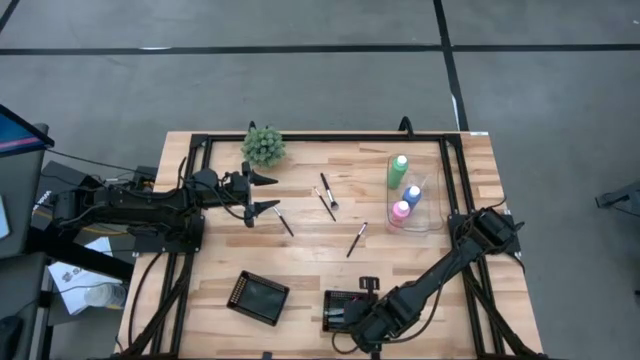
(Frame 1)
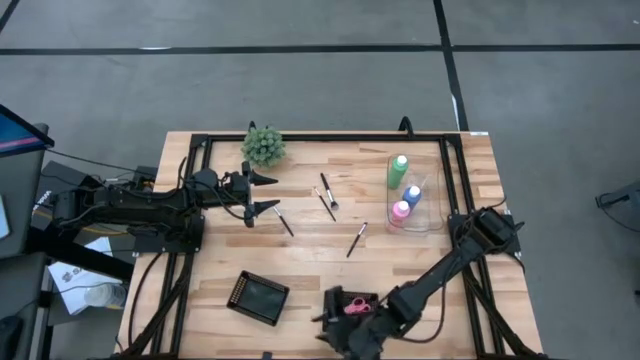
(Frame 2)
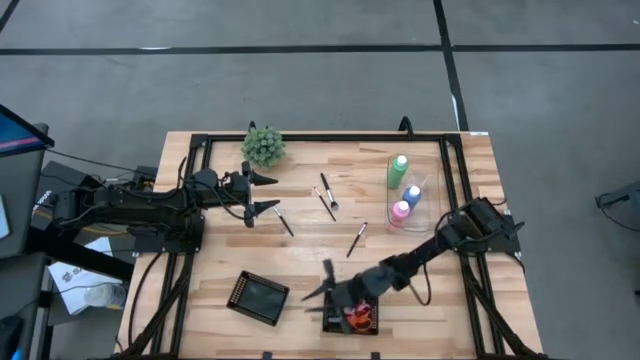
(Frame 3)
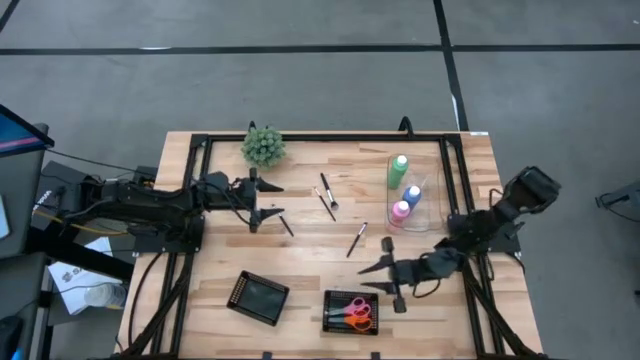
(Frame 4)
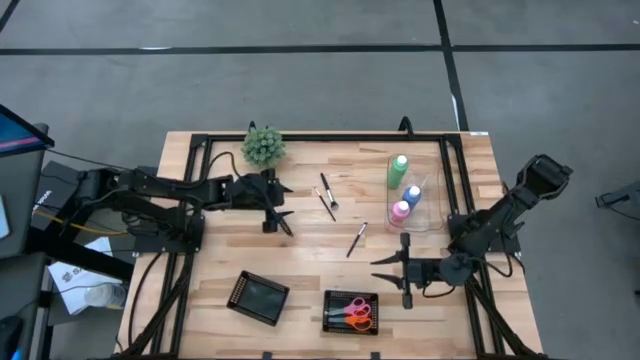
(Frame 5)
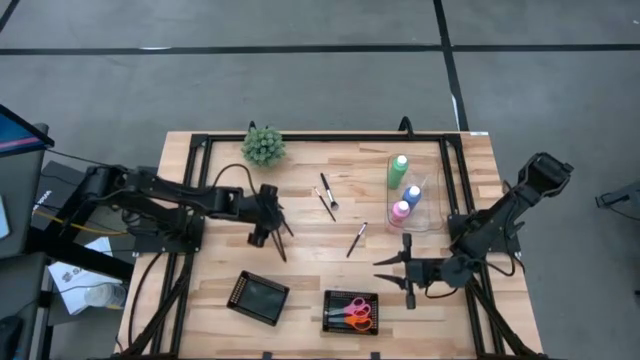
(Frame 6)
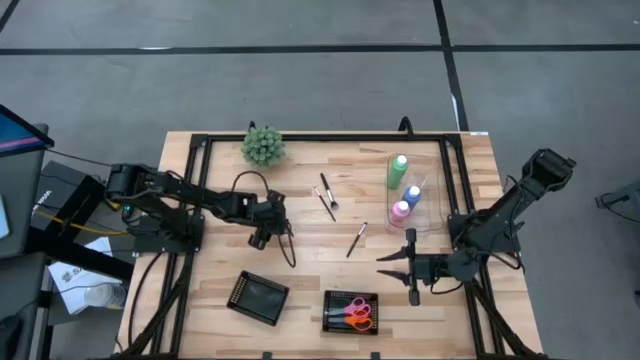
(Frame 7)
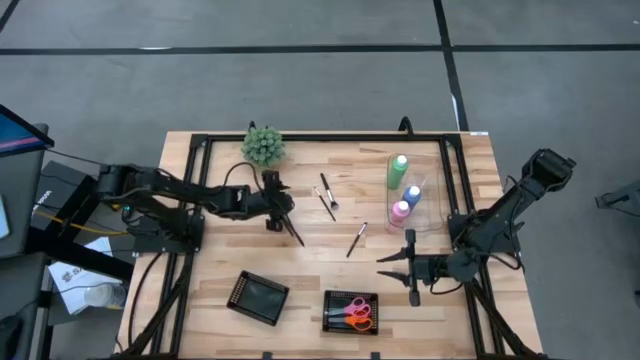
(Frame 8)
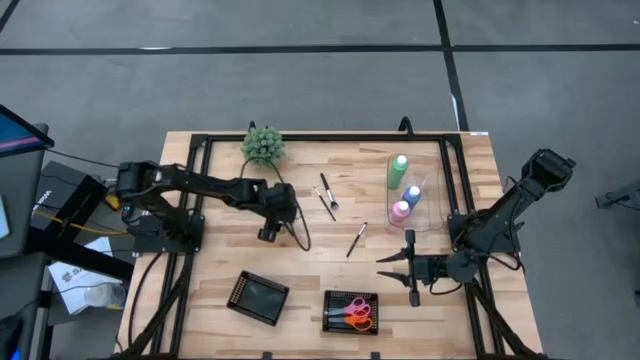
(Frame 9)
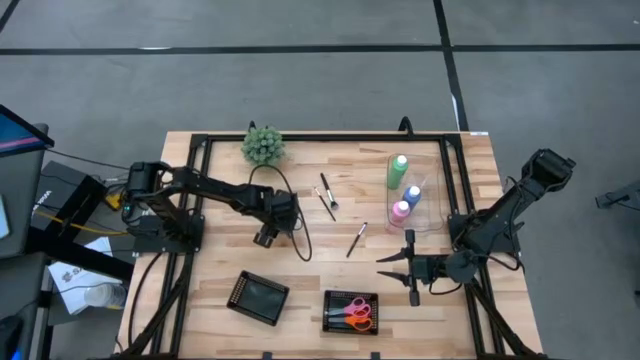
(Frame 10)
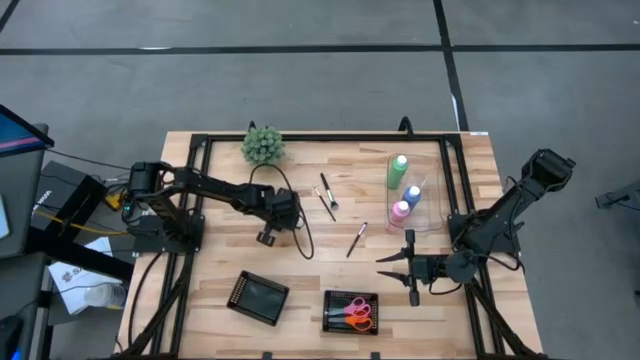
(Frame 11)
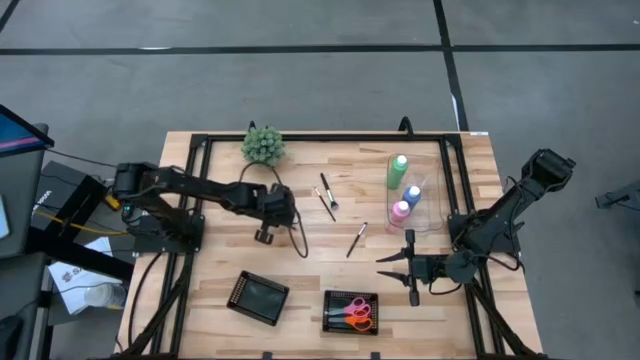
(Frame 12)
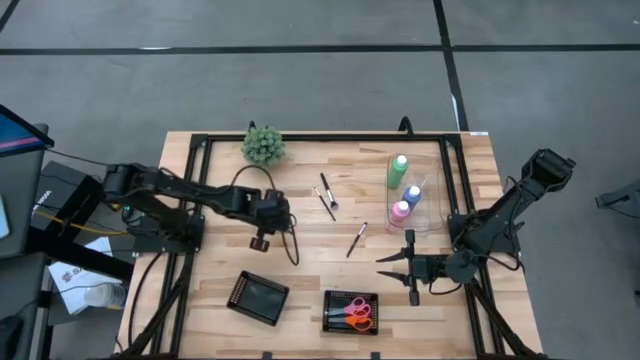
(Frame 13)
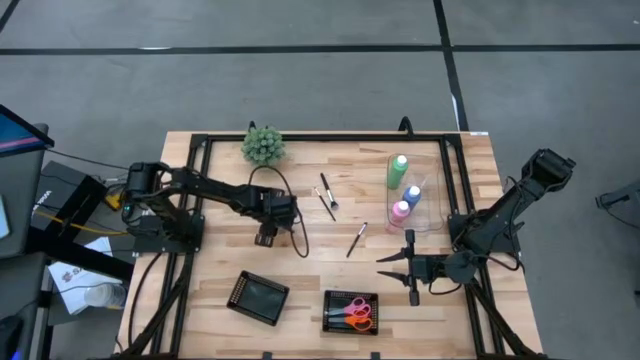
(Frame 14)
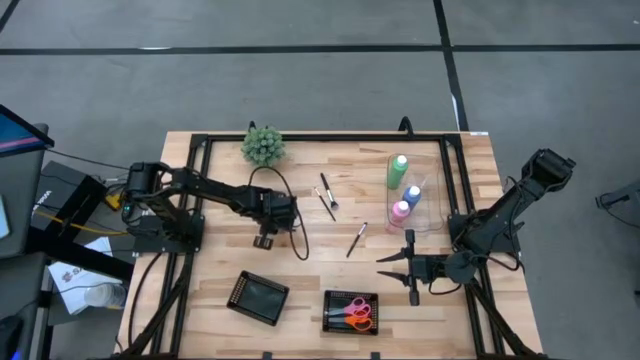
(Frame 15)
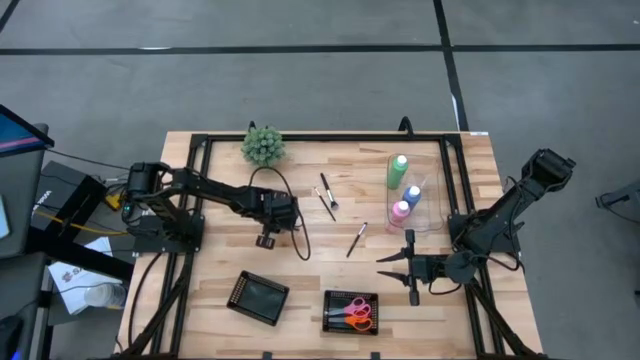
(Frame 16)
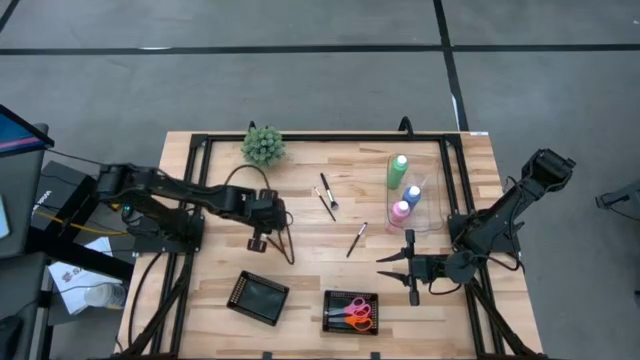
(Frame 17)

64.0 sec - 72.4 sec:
Task: Pick & Place Paint Supplies
Put the black makeup brush into the left black bin

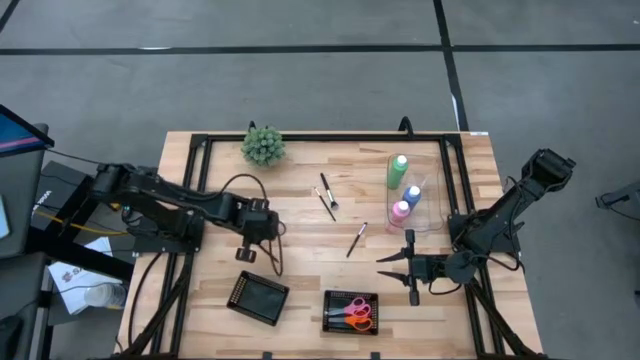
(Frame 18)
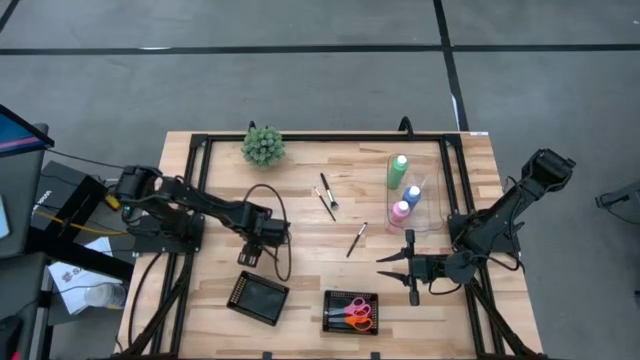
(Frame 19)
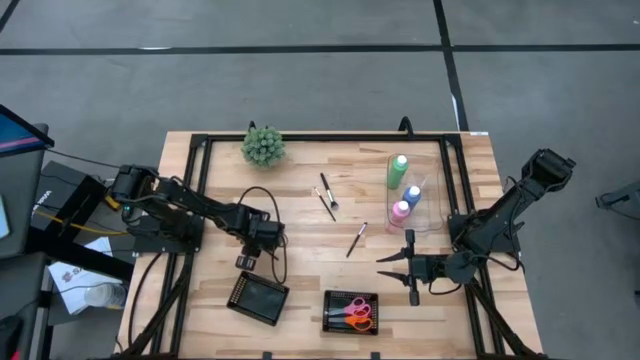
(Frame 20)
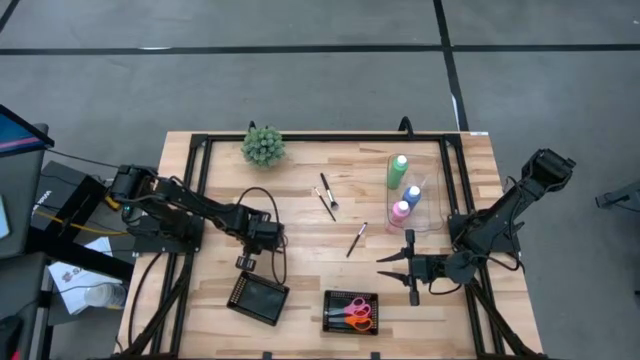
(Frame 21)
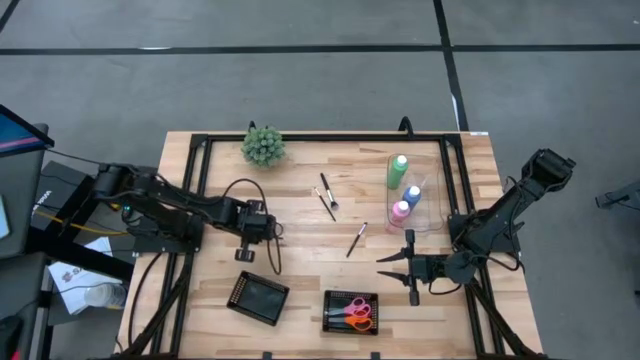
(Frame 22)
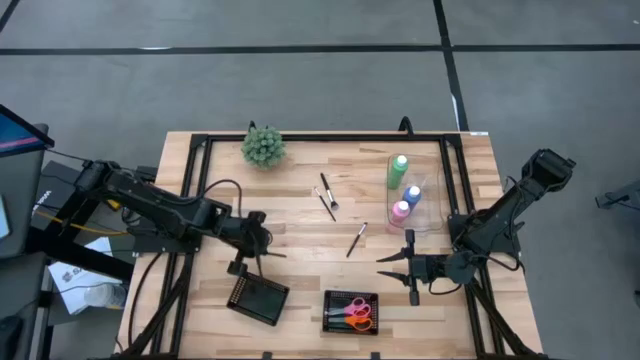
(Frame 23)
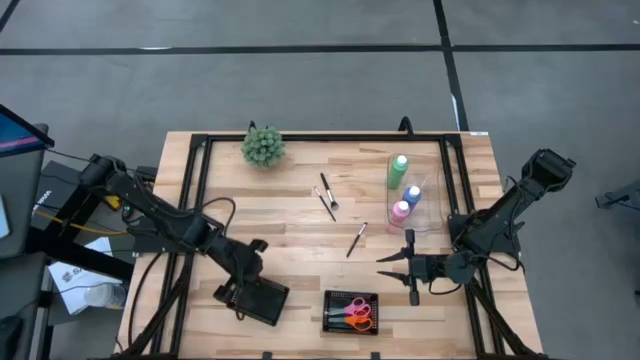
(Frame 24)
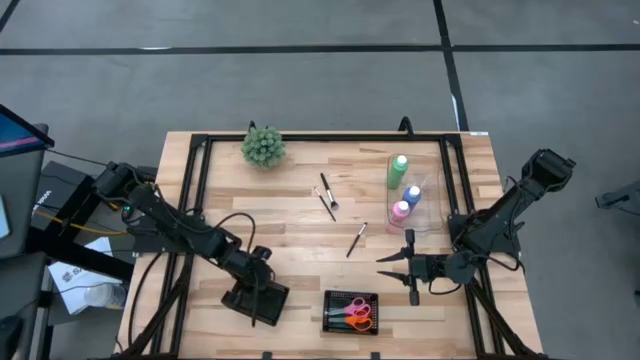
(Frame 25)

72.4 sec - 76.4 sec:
Put the black makeup brush into the left black bin

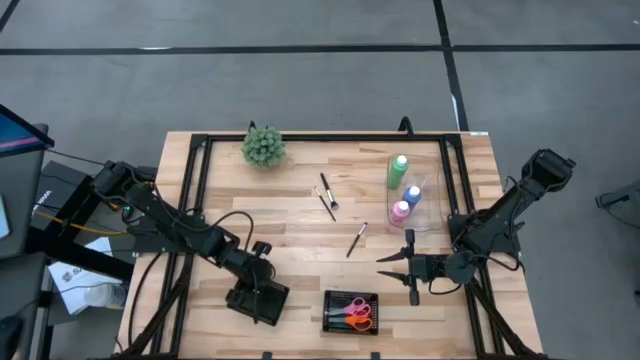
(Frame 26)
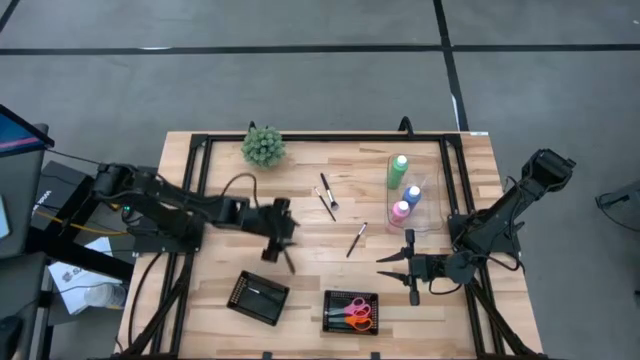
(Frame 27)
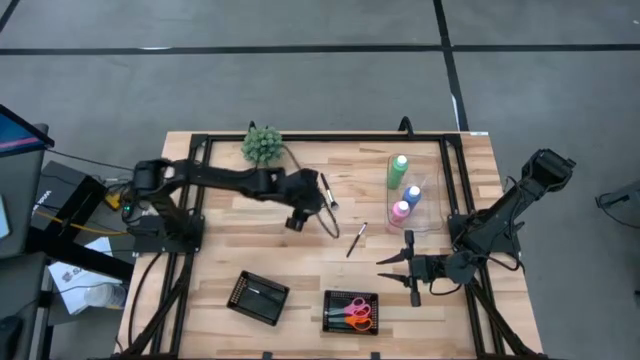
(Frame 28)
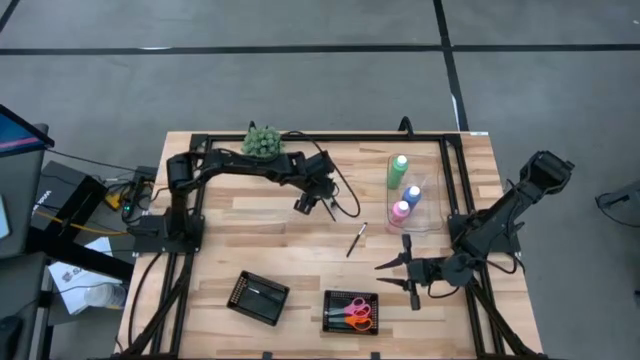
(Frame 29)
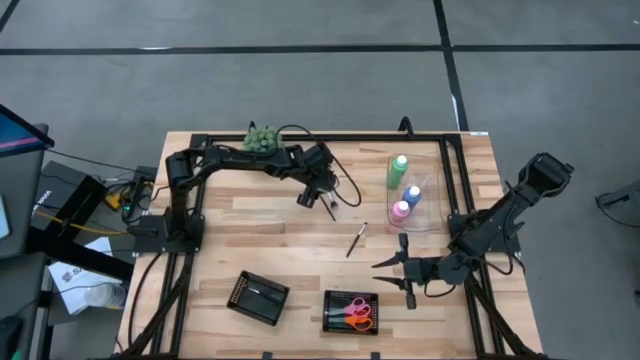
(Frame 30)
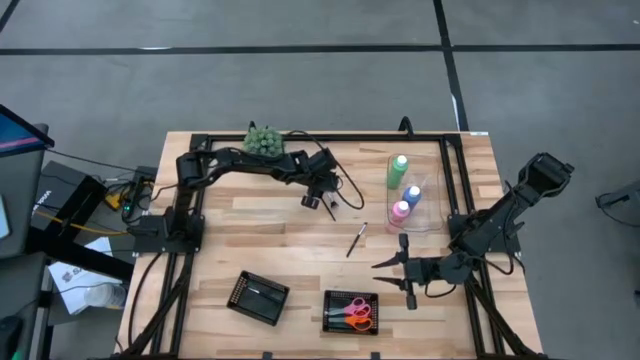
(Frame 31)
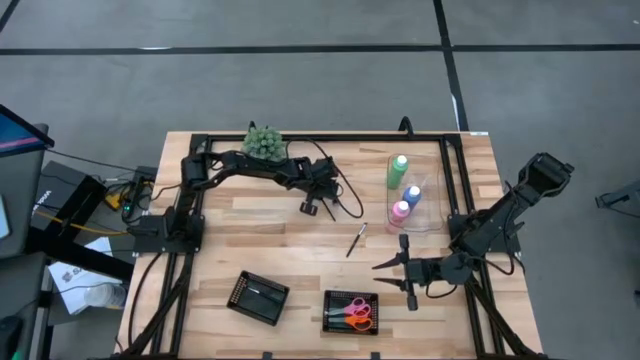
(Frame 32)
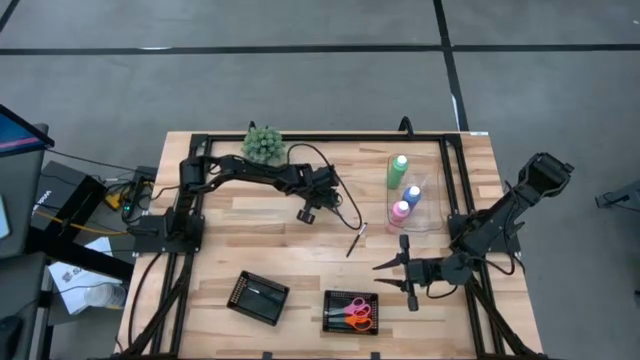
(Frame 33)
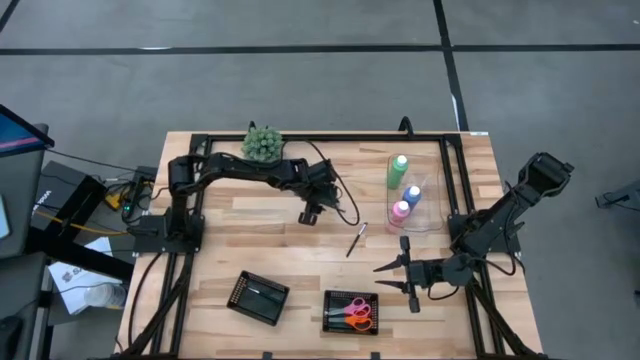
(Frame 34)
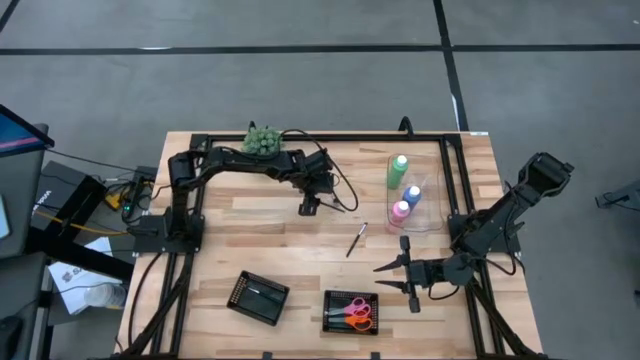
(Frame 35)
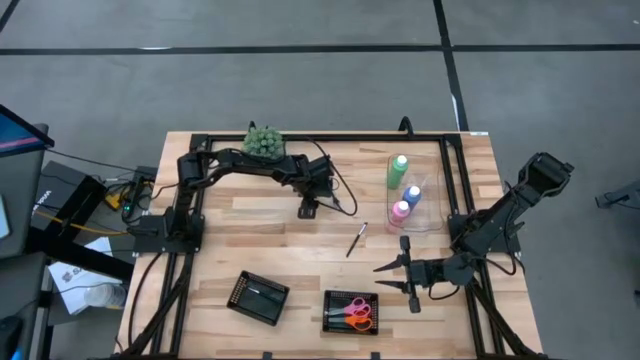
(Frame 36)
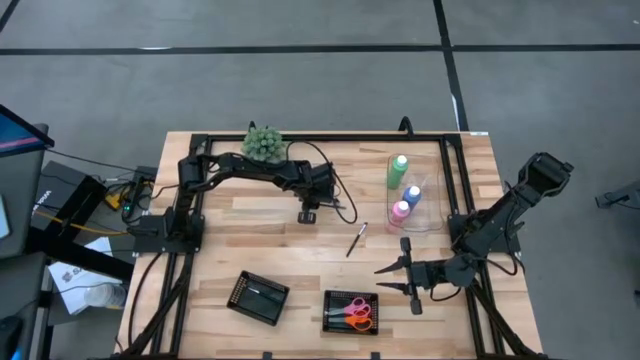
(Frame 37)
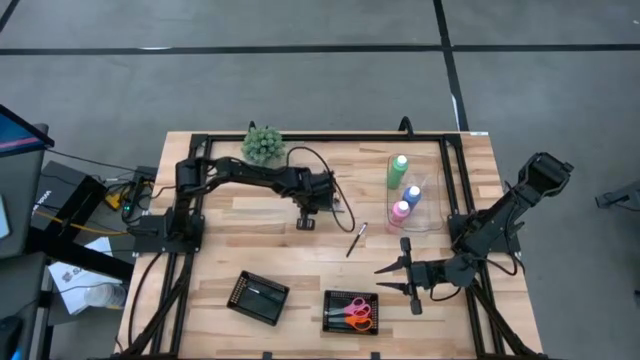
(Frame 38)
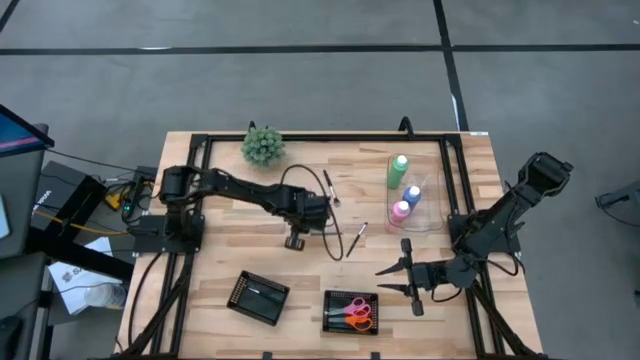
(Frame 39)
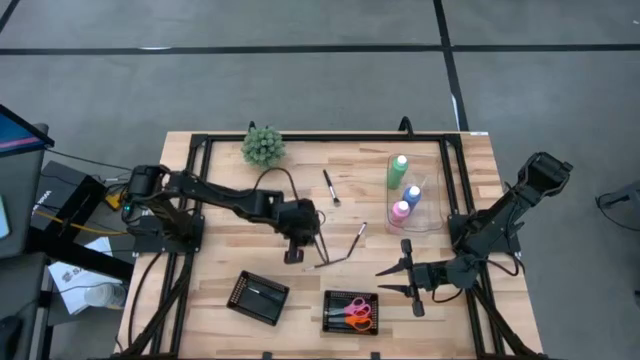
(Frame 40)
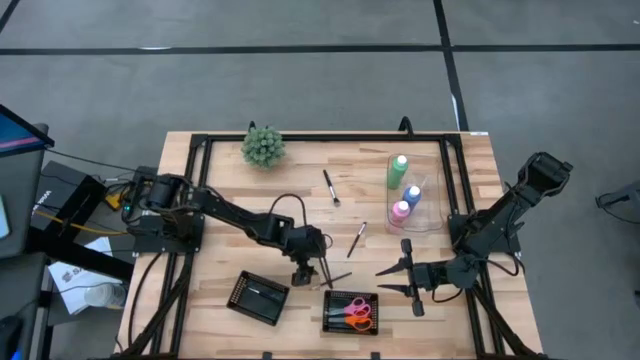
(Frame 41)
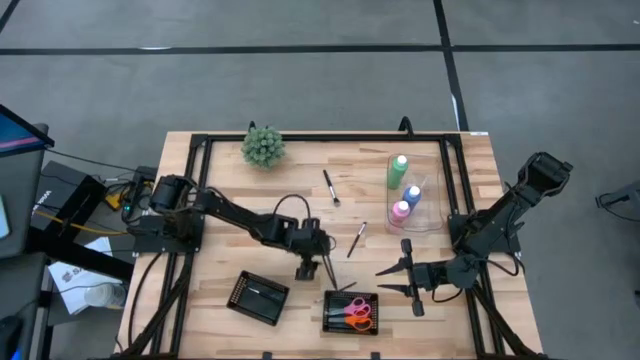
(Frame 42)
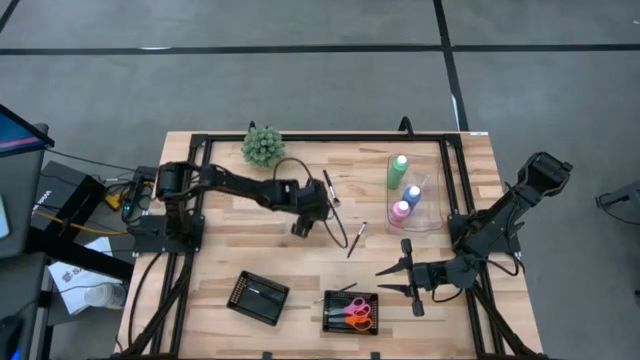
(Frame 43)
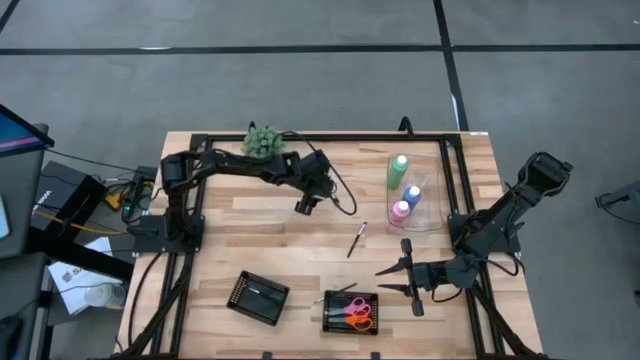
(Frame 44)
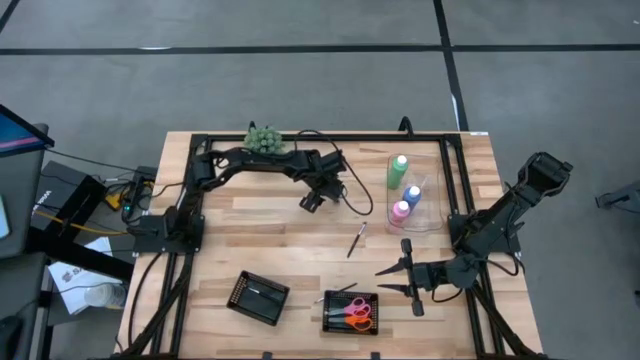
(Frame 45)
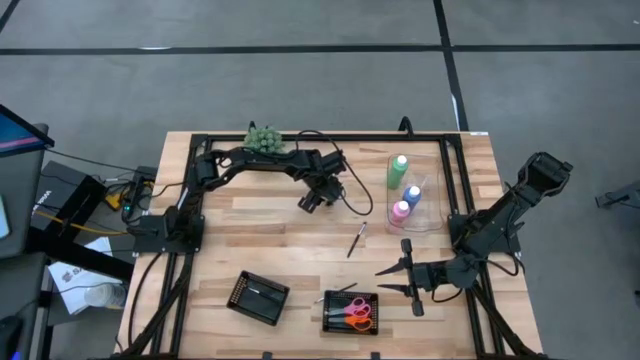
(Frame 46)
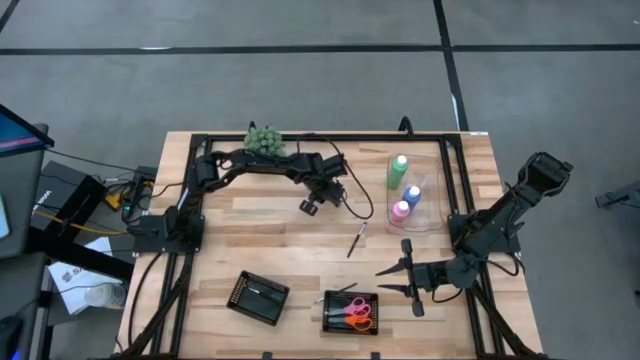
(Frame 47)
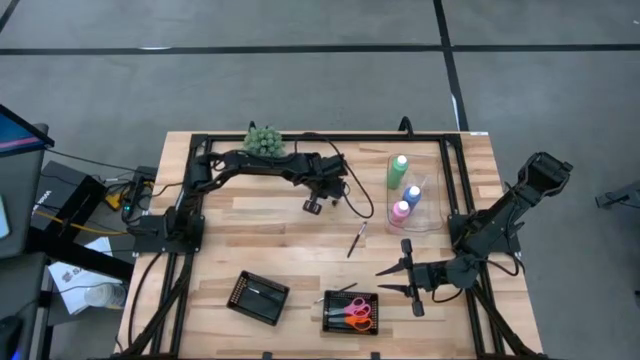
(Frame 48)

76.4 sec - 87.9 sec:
Put the black makeup brush into the left black bin
